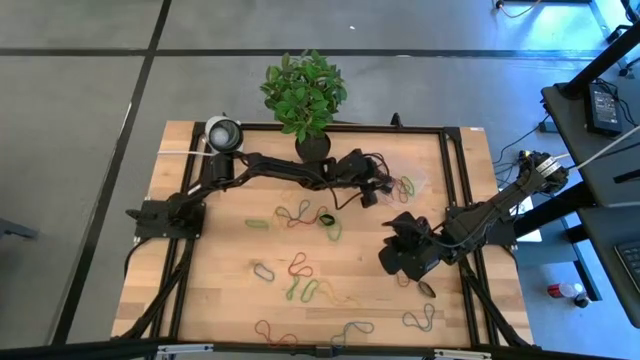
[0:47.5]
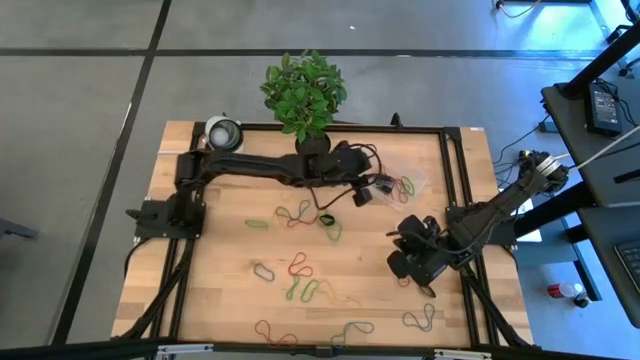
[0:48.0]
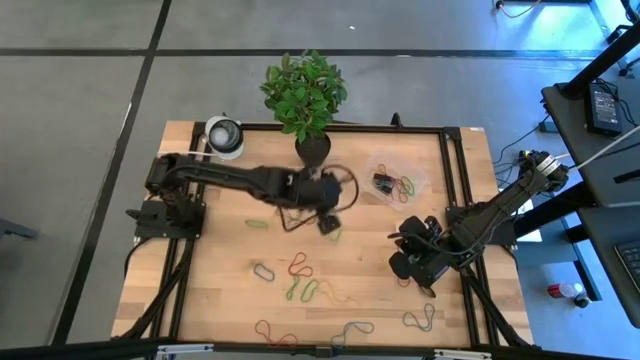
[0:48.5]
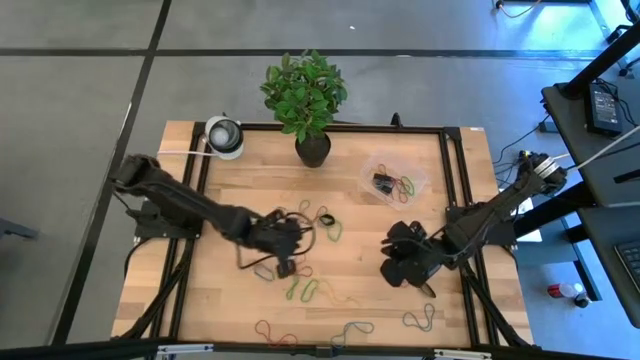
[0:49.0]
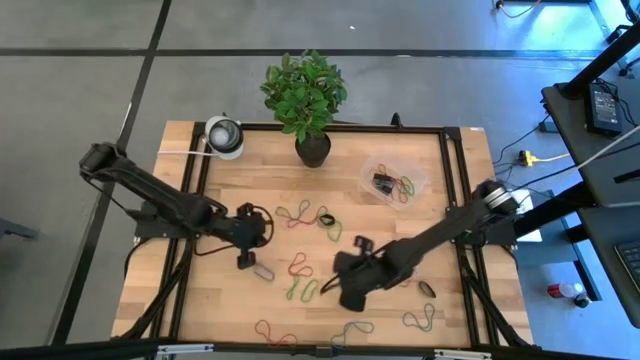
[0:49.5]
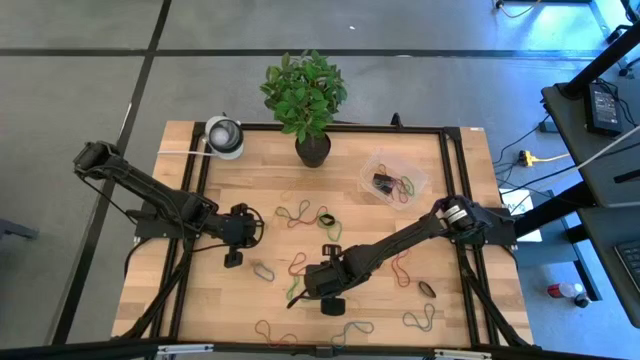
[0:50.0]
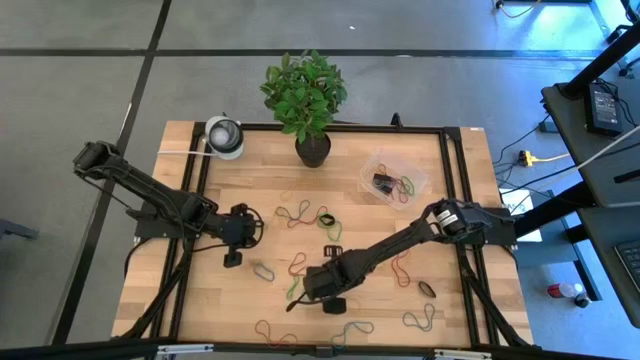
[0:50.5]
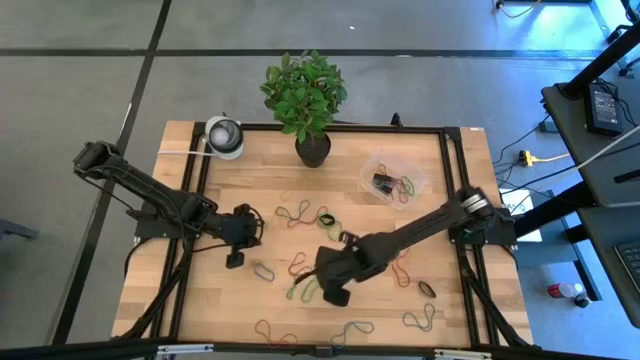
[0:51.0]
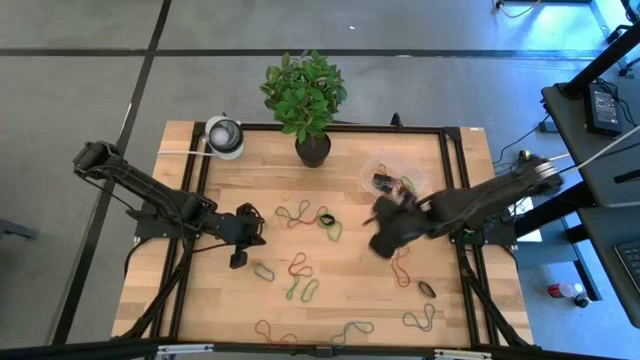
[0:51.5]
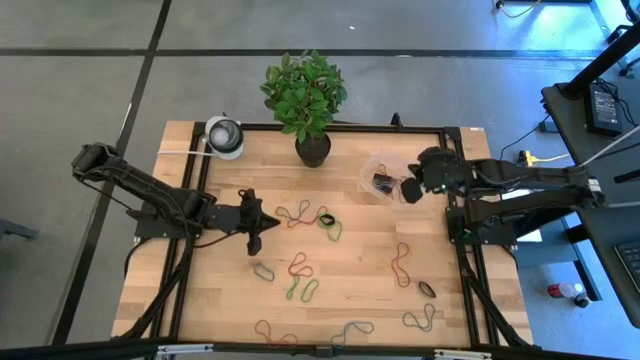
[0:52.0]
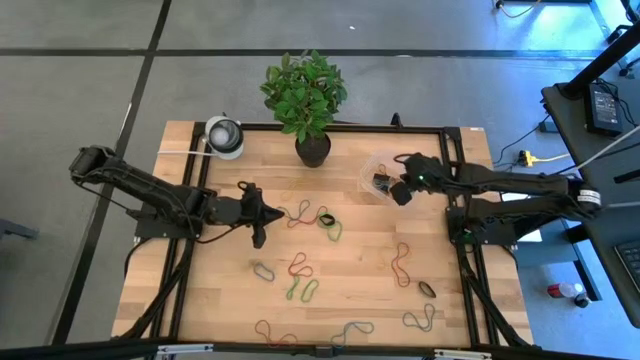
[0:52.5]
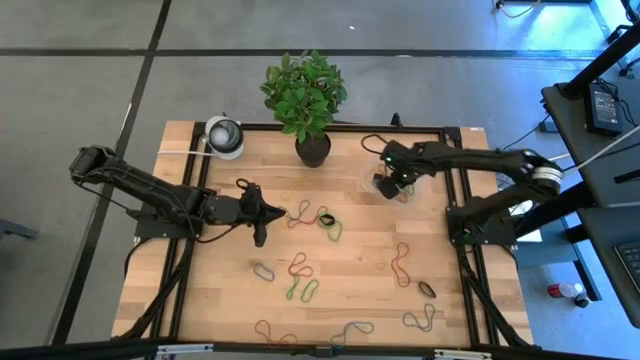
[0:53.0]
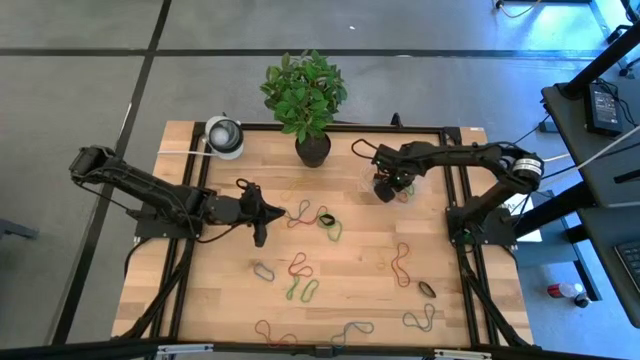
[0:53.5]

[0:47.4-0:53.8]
Task: Pick and place rubber bands into bin
Put the yellow rubber band into the bin

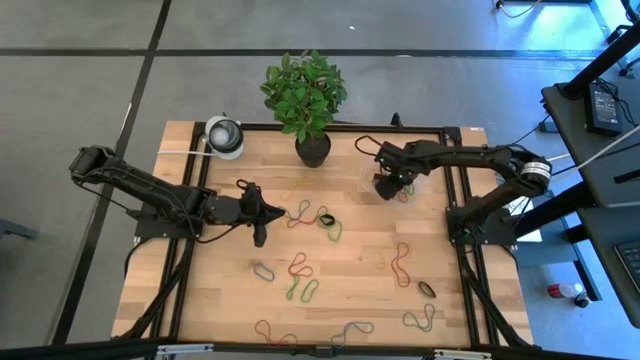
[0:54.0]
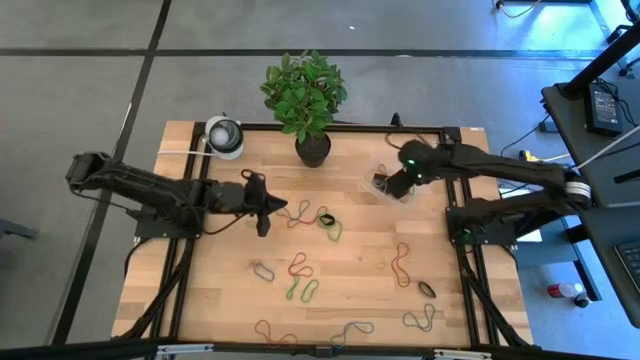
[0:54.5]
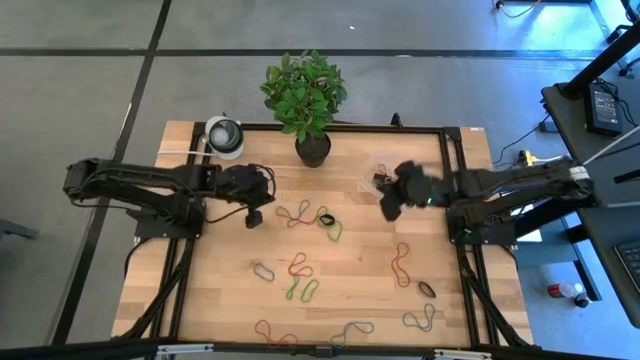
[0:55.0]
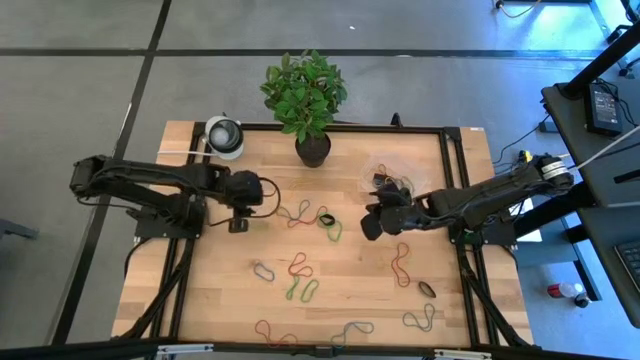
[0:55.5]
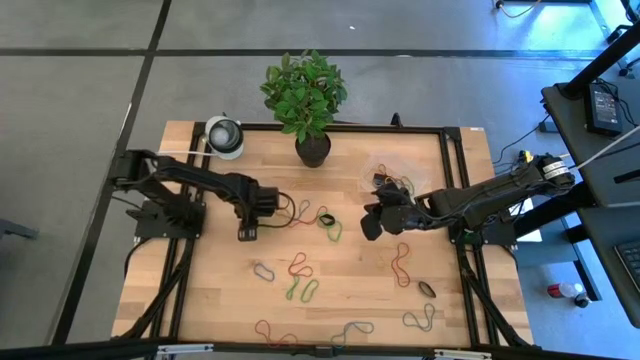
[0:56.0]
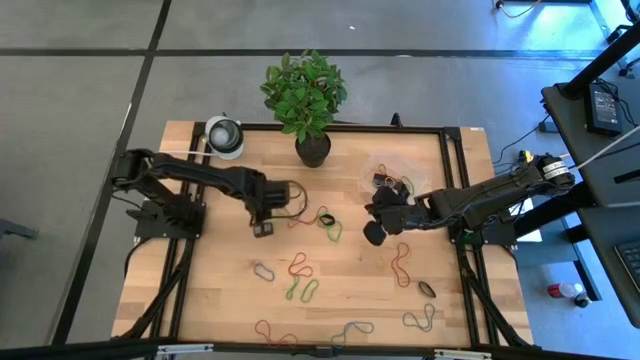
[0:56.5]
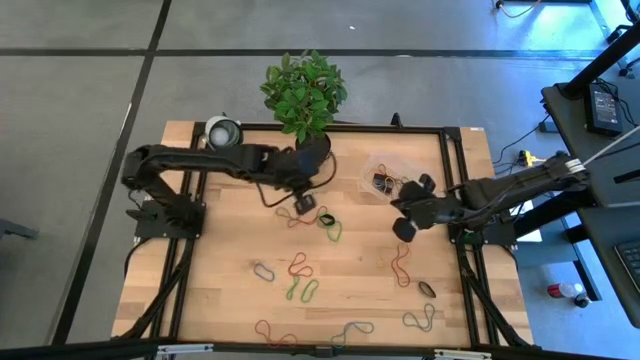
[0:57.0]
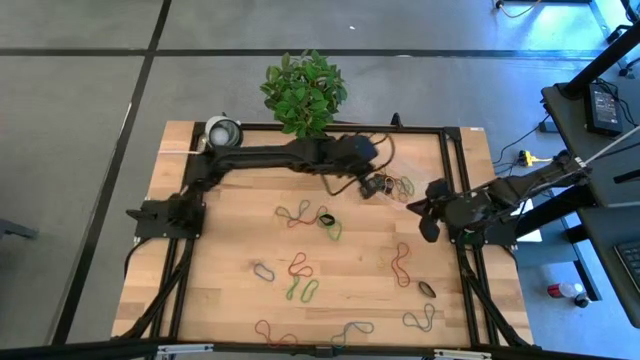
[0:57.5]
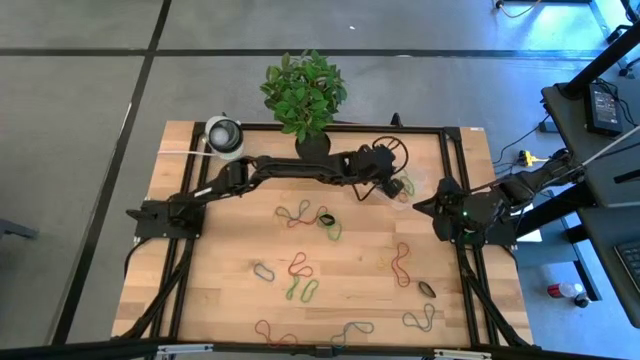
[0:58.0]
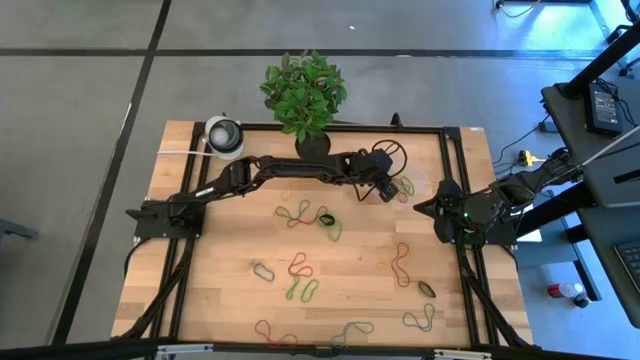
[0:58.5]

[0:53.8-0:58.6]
Put the green rubber band into the bin

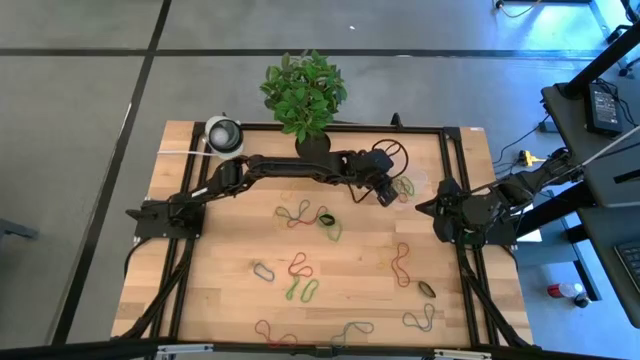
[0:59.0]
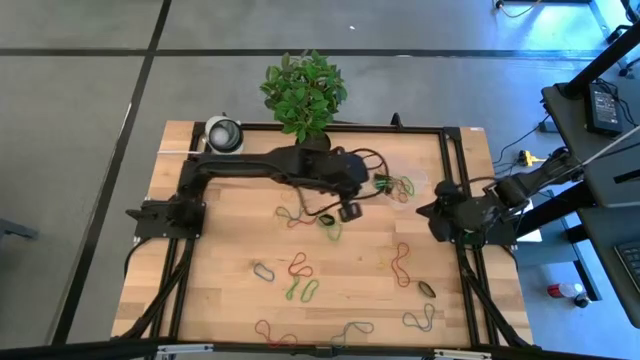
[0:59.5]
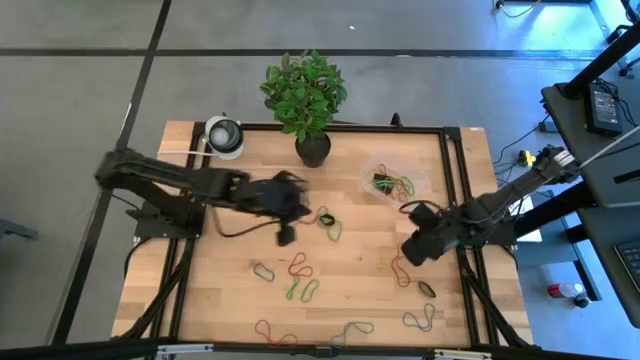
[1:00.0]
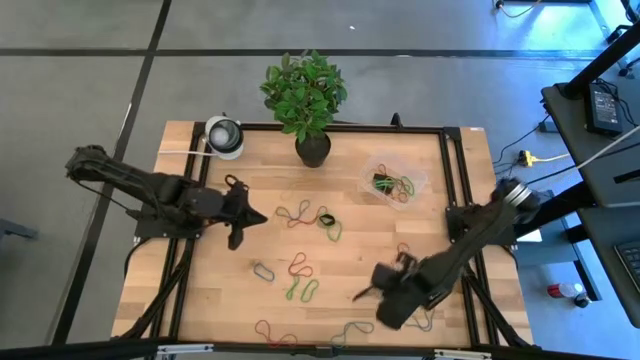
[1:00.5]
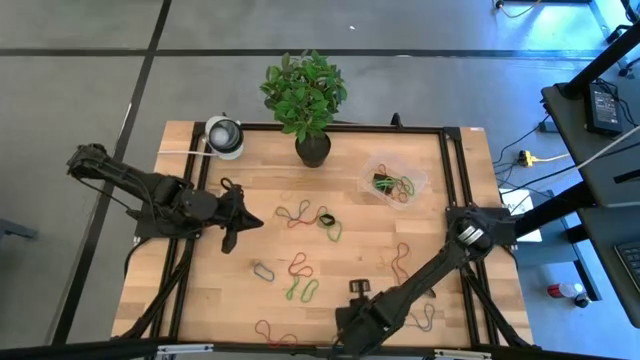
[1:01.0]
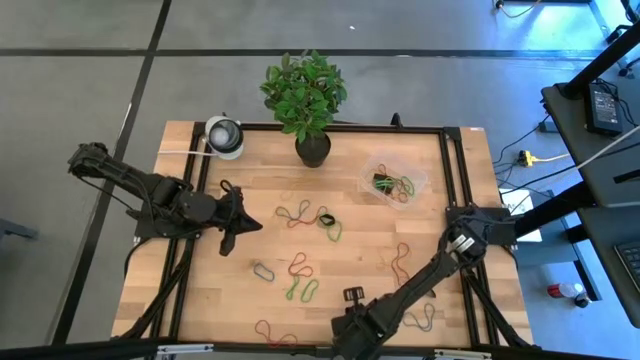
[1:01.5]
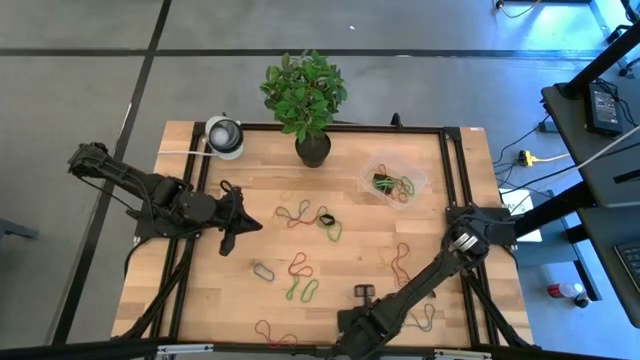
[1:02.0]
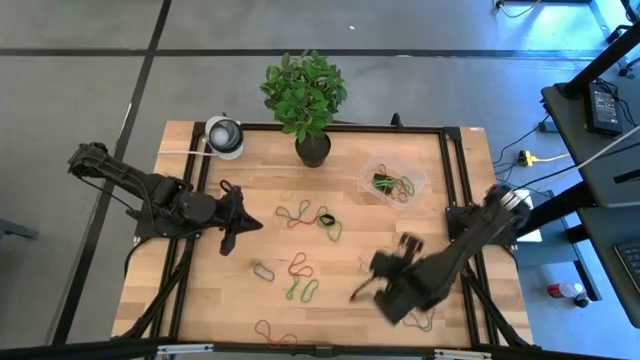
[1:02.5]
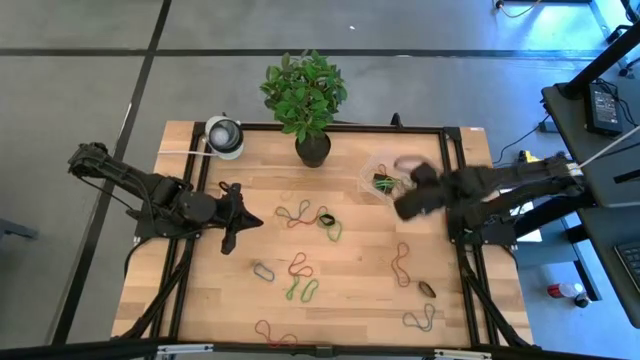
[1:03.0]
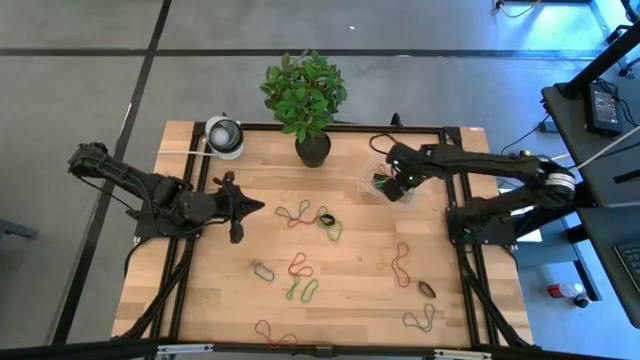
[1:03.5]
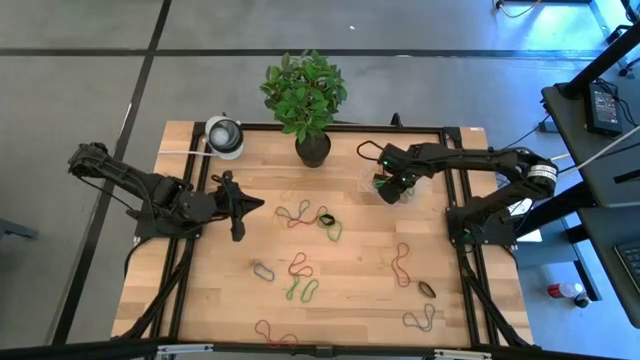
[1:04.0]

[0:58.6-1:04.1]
Put the blue rubber band into the bin

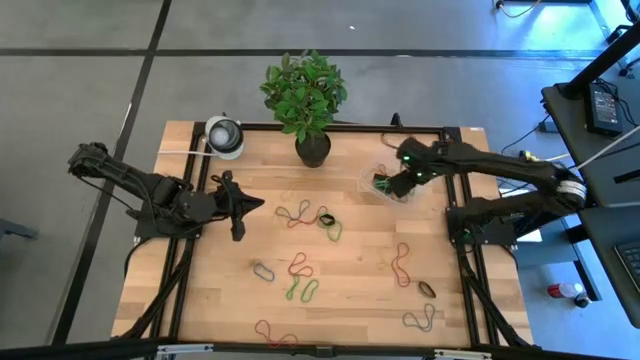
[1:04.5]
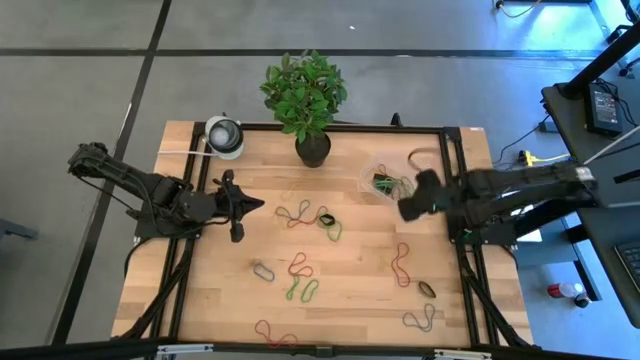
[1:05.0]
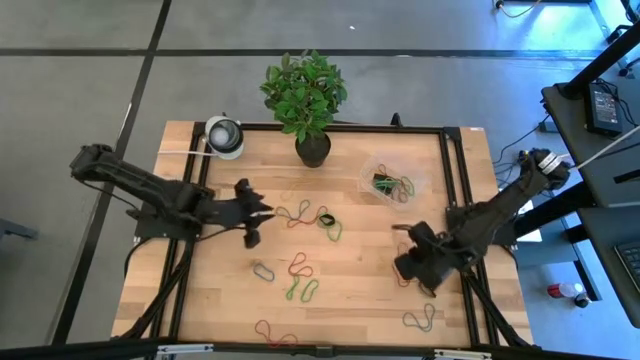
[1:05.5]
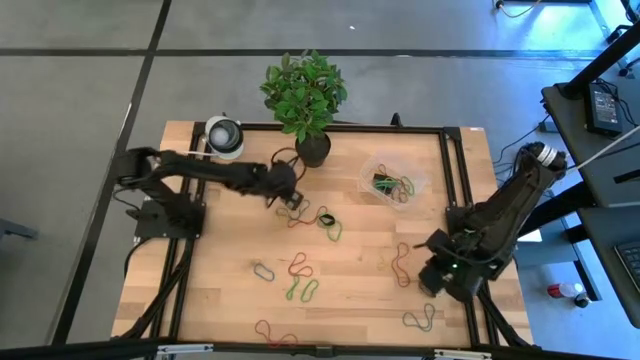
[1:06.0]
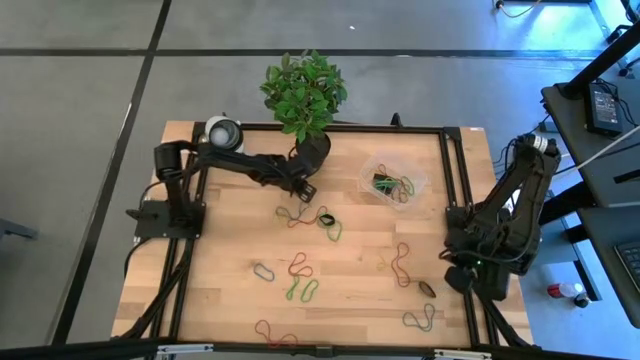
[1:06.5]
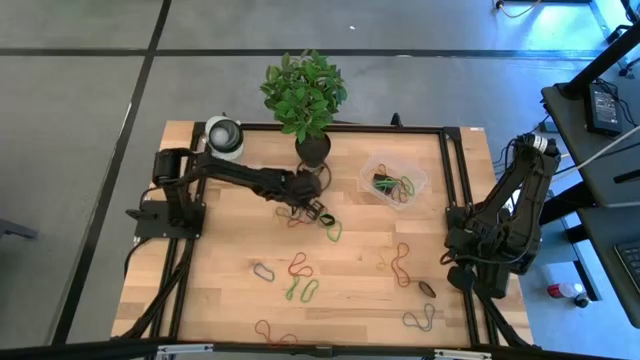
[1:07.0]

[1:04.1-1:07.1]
Put the top yellow rubber band into the bin

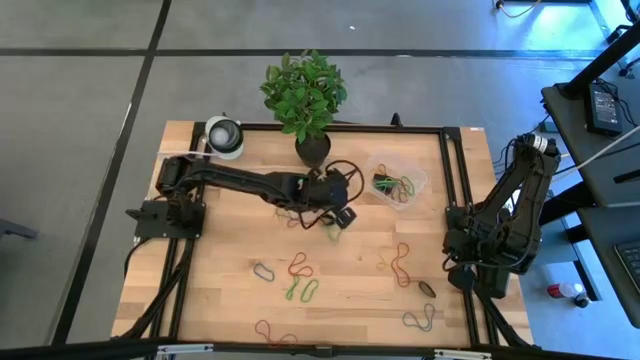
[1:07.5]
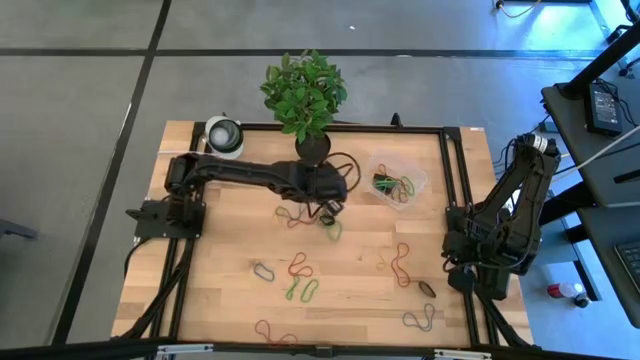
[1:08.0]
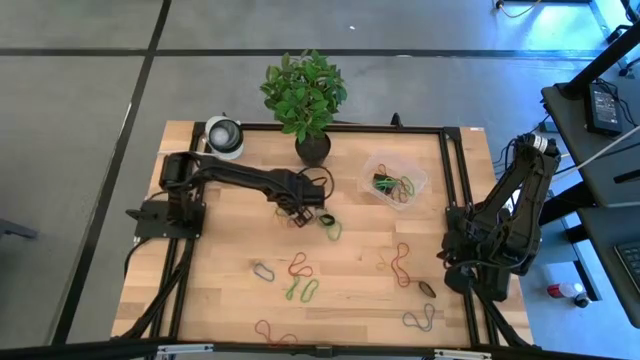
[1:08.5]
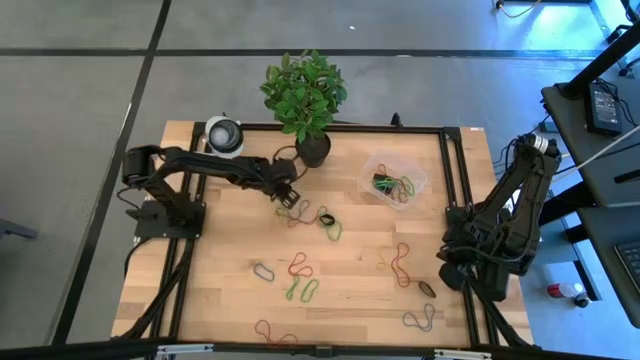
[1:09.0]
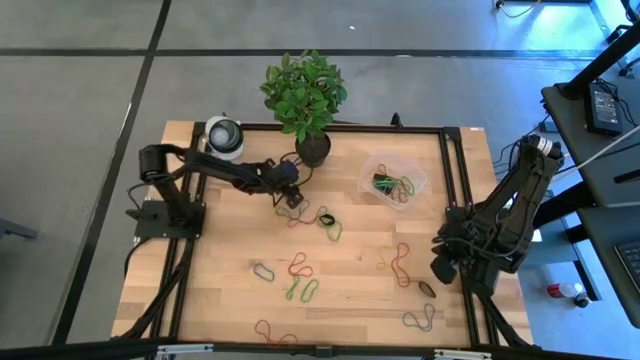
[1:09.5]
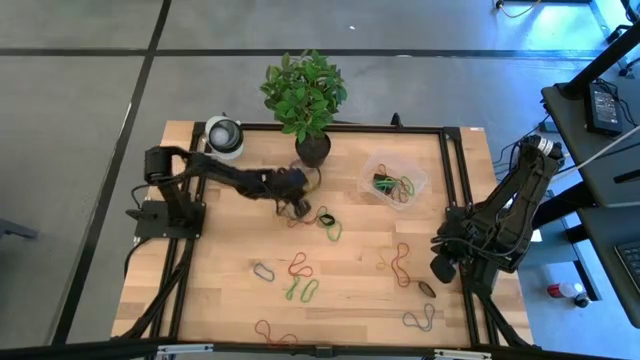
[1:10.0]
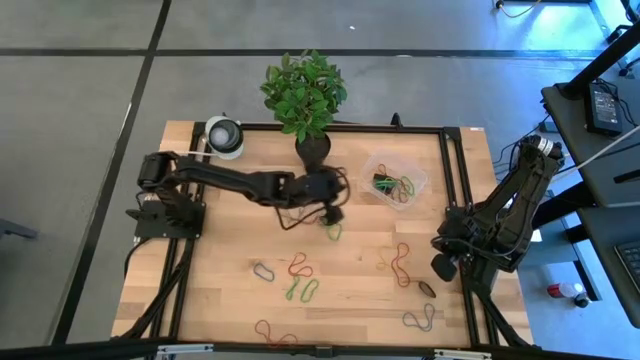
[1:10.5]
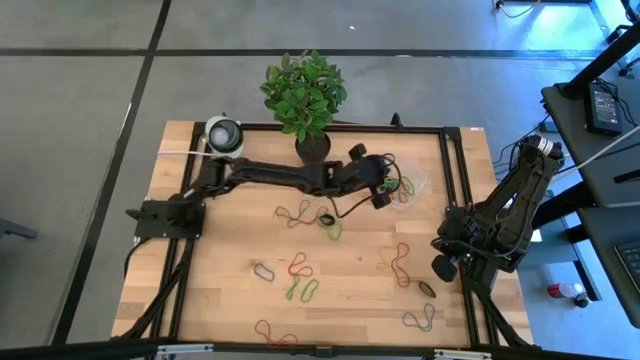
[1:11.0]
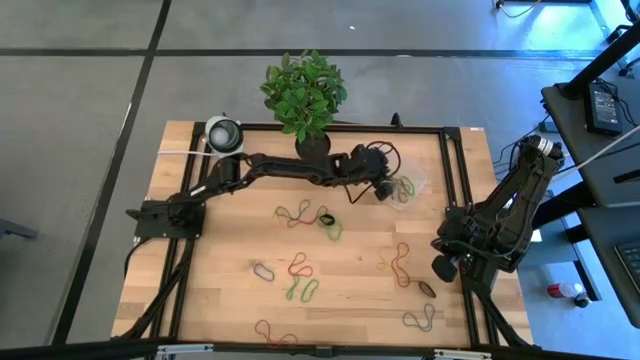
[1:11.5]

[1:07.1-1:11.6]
Put the top yellow rubber band into the bin
